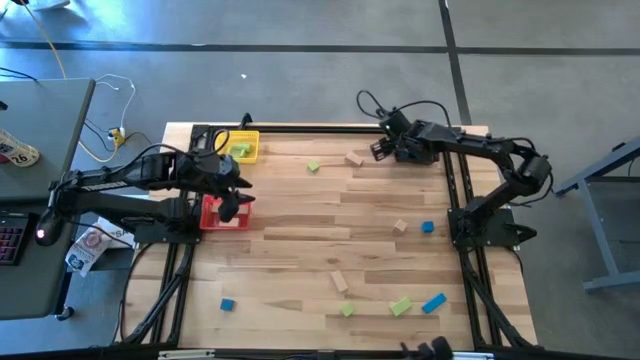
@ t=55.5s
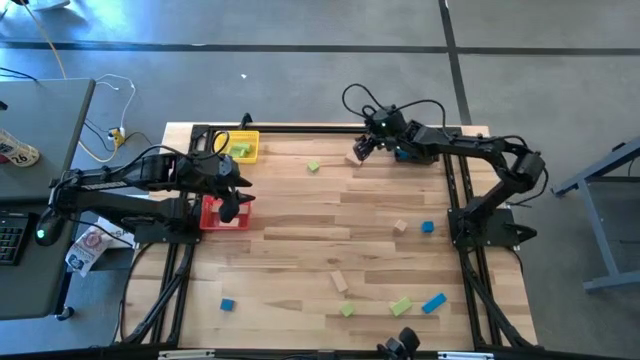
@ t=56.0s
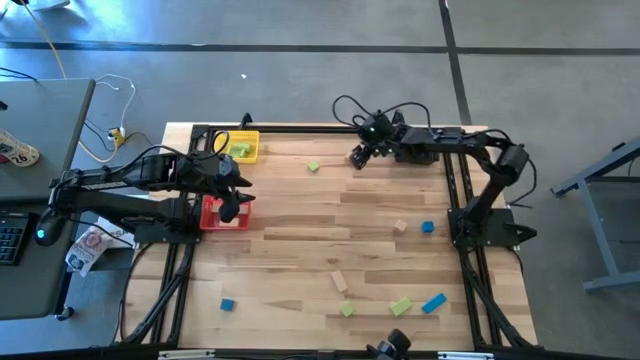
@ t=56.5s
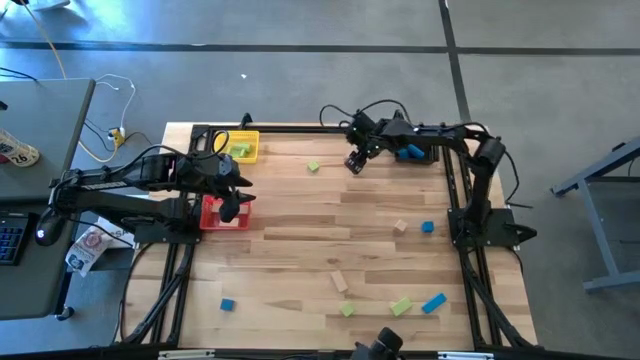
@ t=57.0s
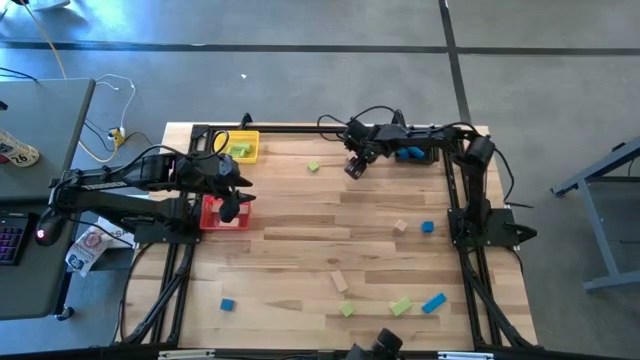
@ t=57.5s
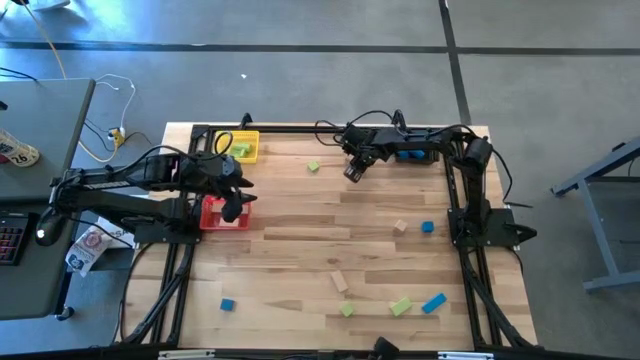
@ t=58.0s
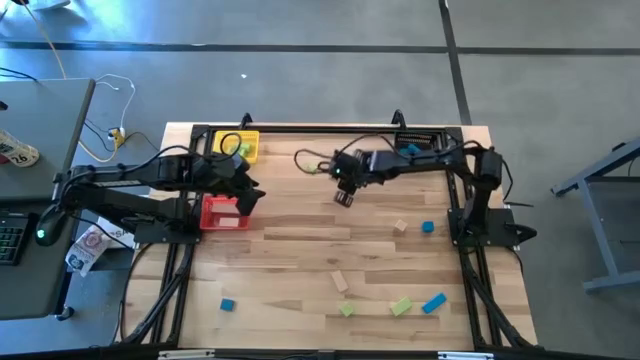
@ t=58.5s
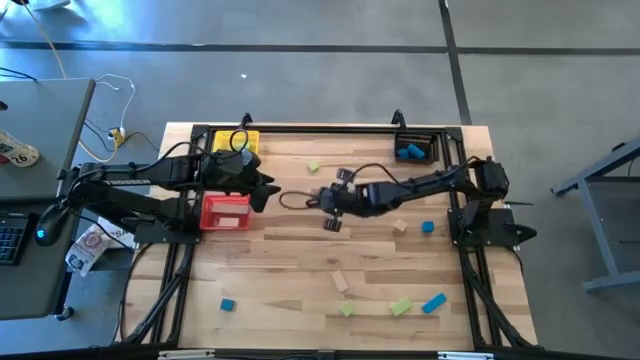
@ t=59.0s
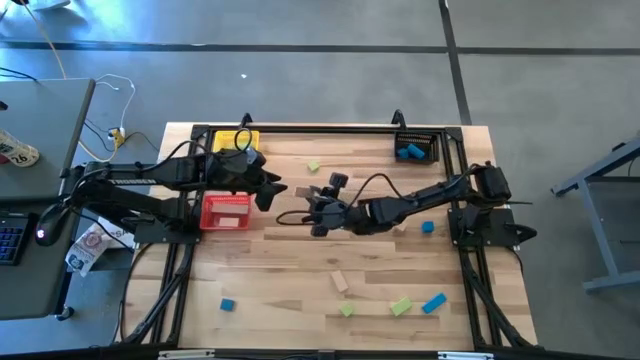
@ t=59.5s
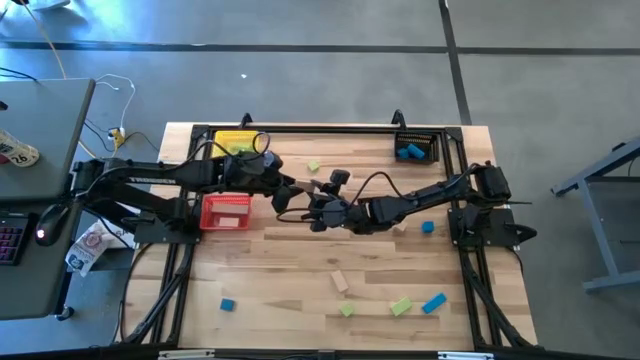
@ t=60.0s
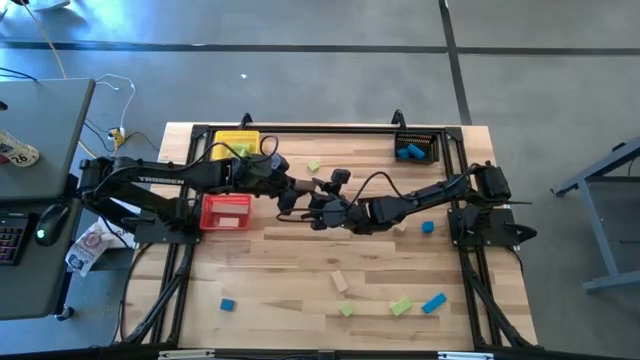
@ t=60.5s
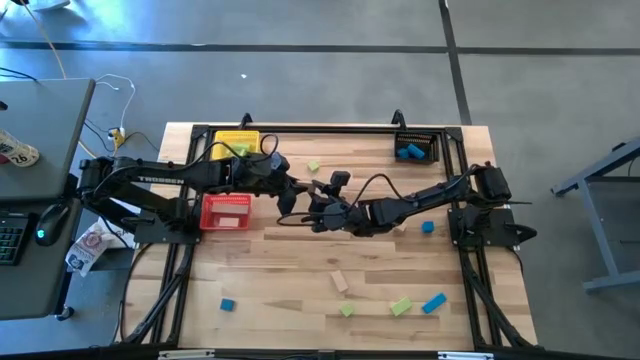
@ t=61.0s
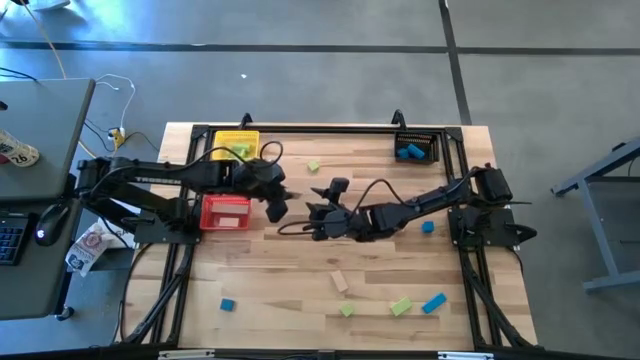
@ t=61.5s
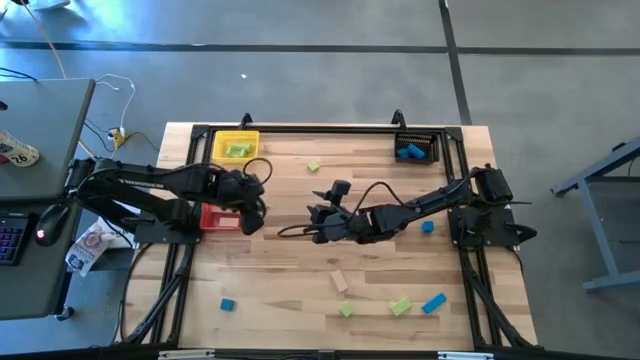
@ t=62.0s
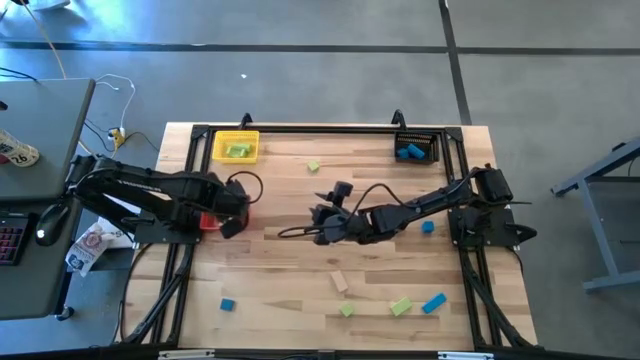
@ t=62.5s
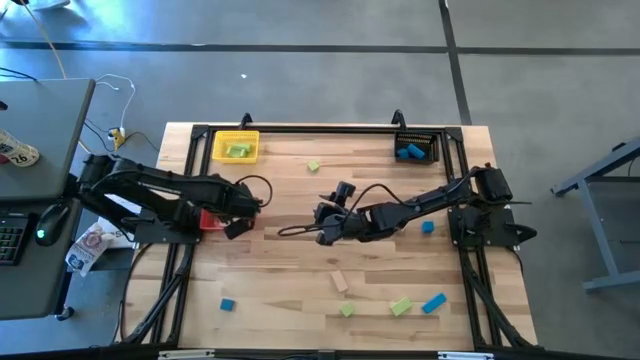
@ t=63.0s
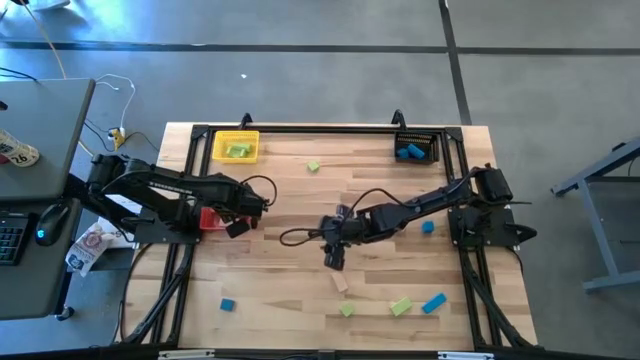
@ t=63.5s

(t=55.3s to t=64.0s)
Task: Sort & place blocks by color
Put the brown block into the red bin

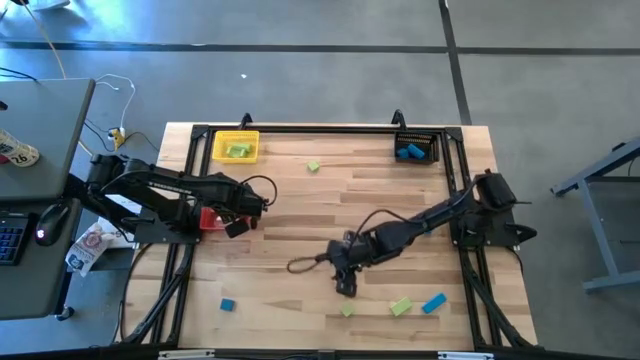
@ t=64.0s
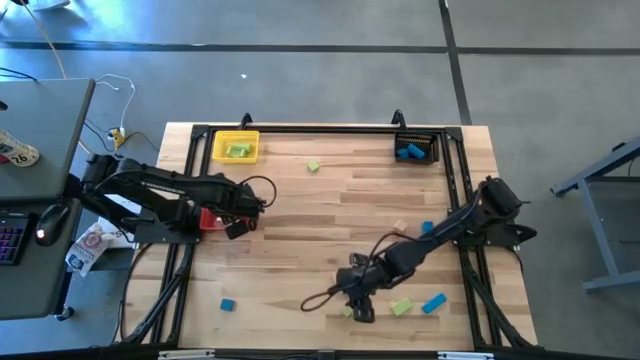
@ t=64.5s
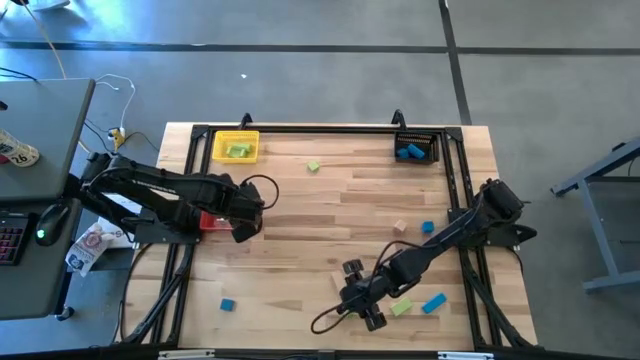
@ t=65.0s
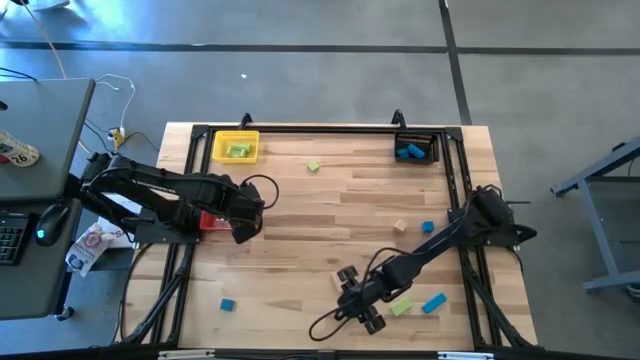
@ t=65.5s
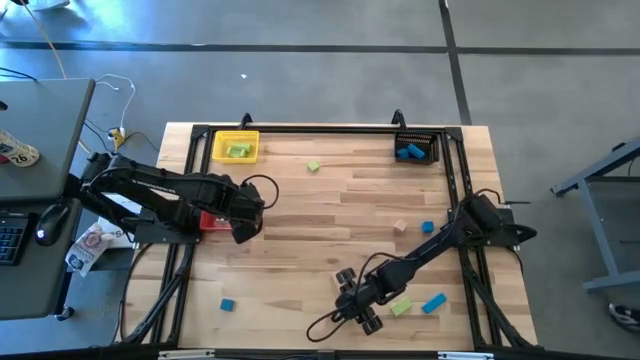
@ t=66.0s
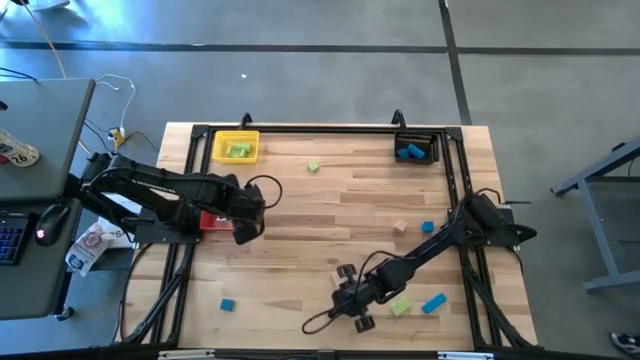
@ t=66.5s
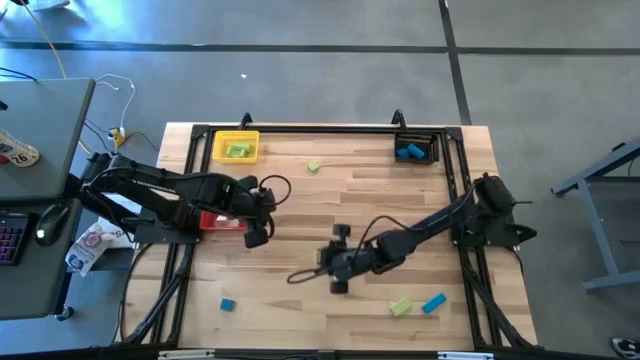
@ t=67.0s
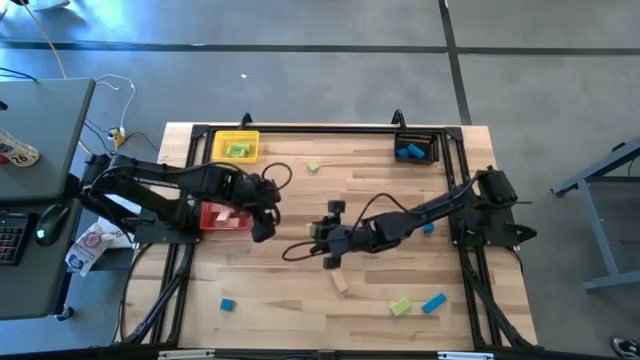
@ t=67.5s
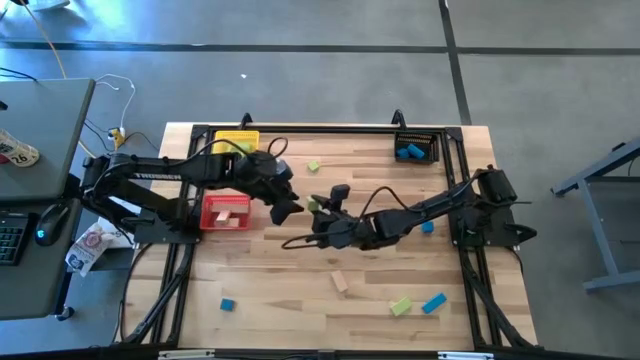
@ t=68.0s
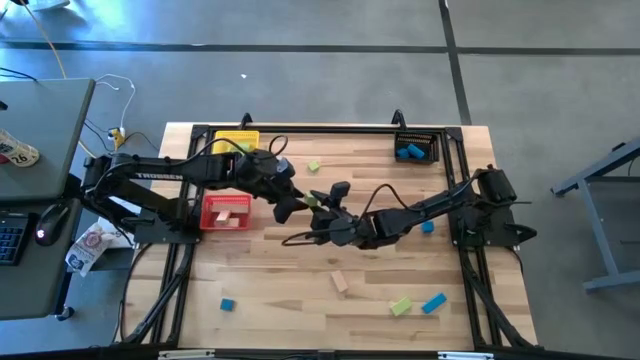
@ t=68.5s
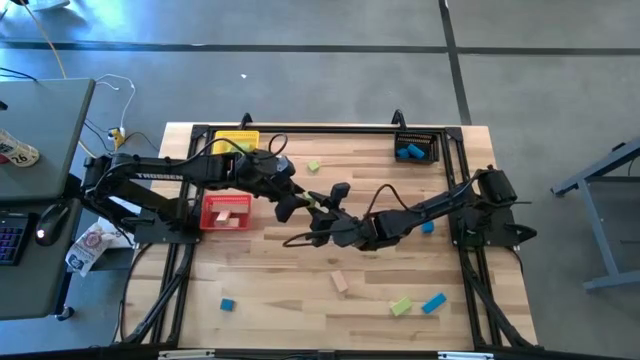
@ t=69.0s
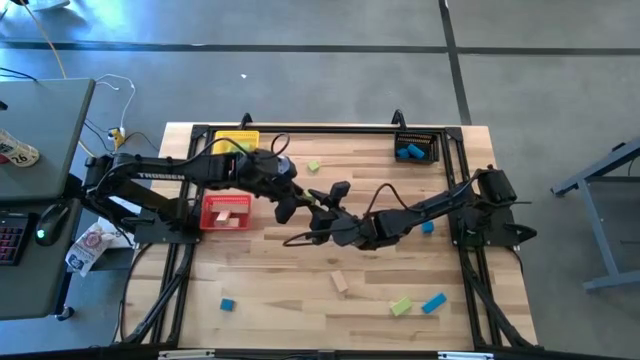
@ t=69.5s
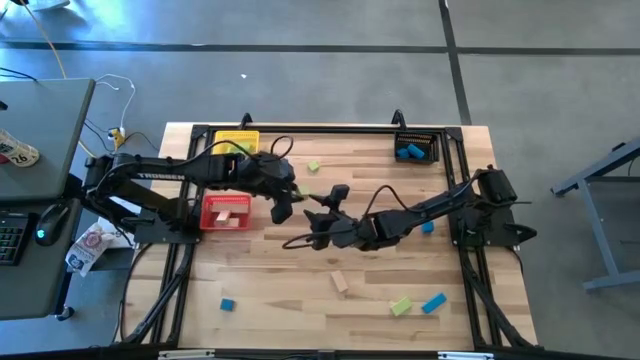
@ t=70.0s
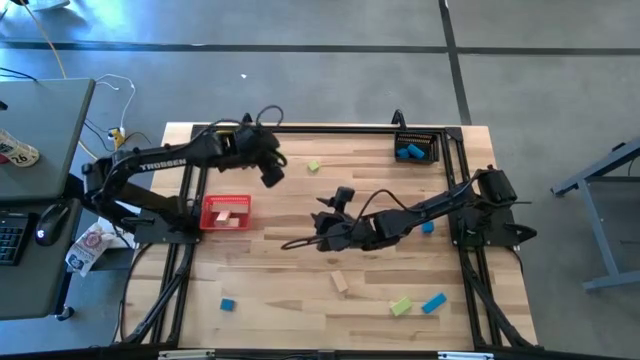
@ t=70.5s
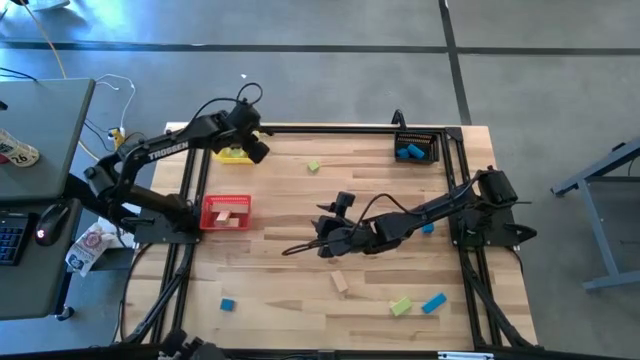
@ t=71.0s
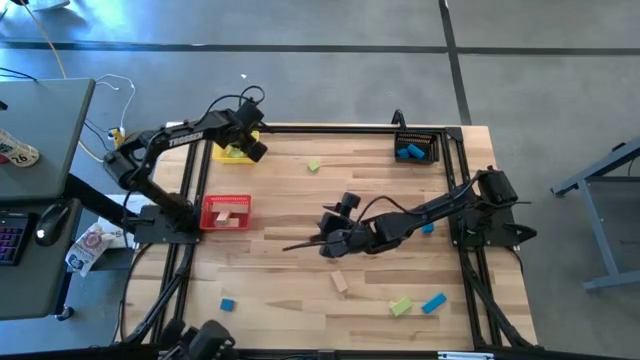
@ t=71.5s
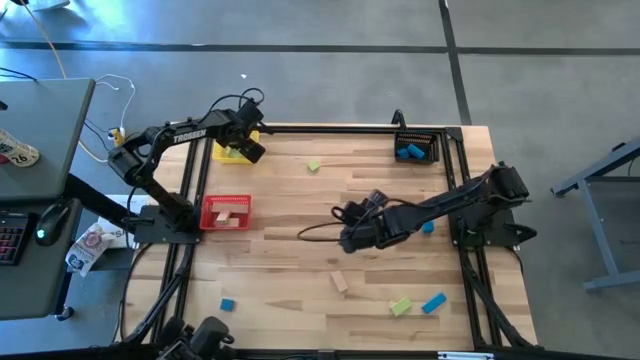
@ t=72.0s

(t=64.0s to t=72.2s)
Put the green block into the yellow bin

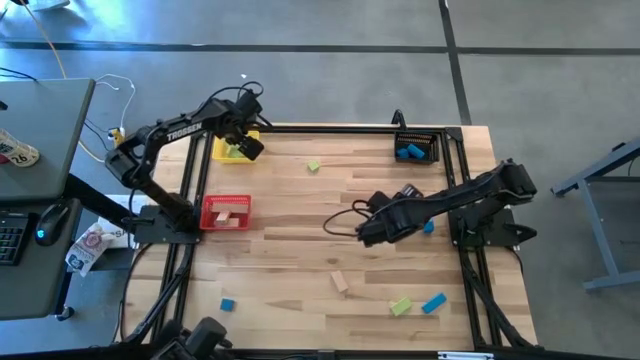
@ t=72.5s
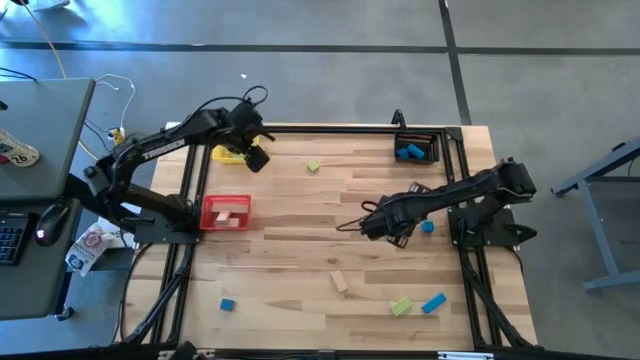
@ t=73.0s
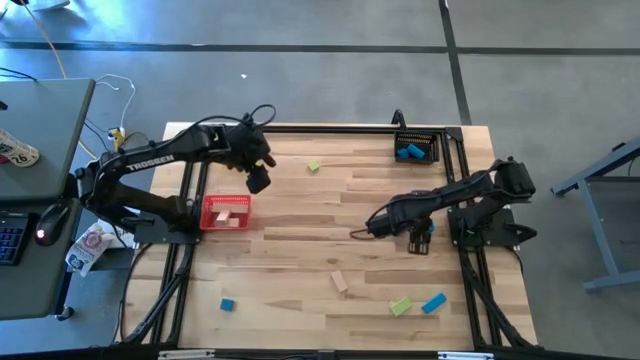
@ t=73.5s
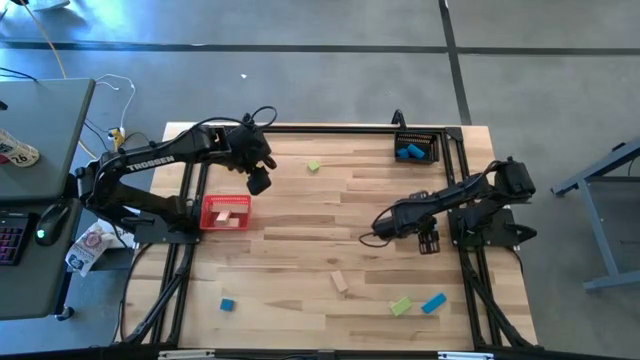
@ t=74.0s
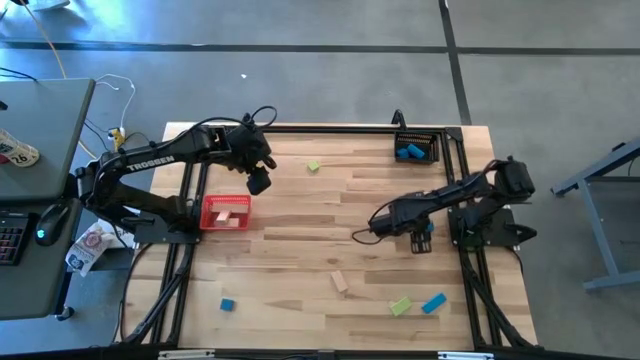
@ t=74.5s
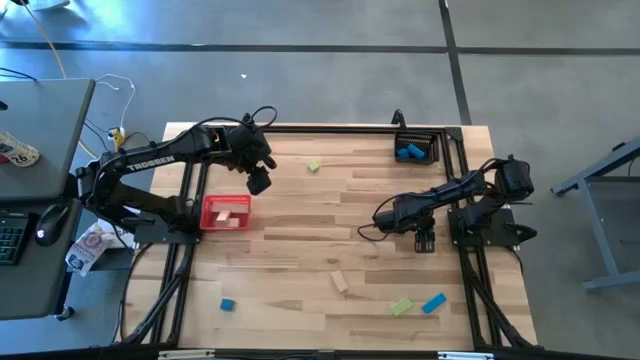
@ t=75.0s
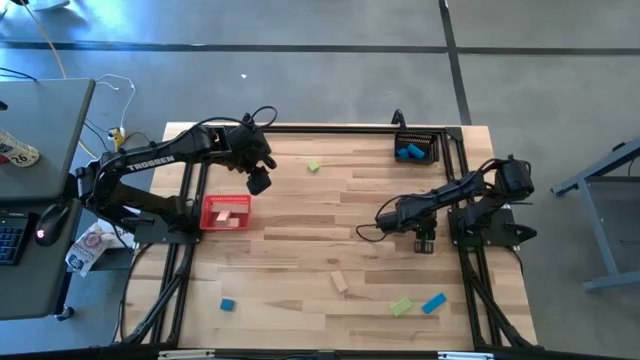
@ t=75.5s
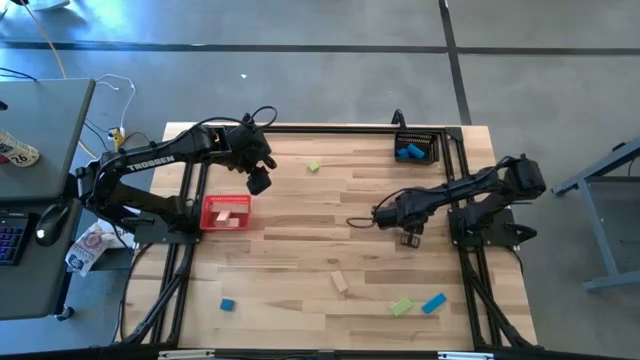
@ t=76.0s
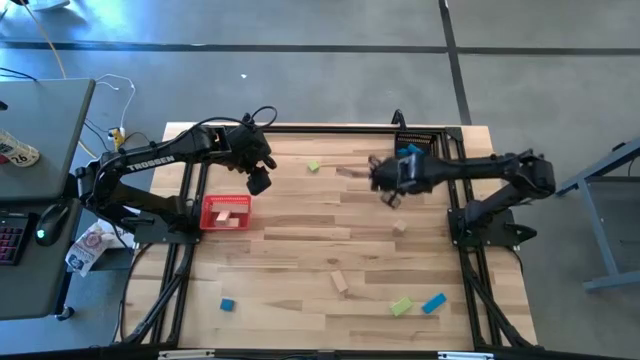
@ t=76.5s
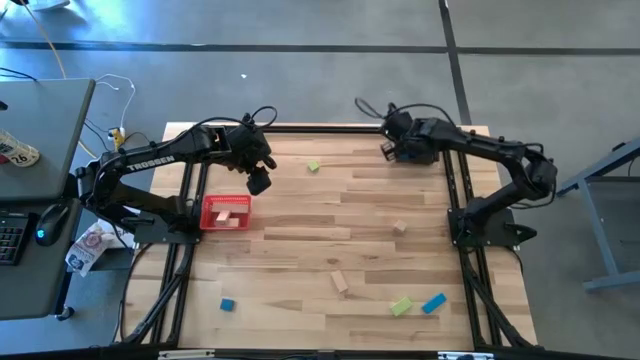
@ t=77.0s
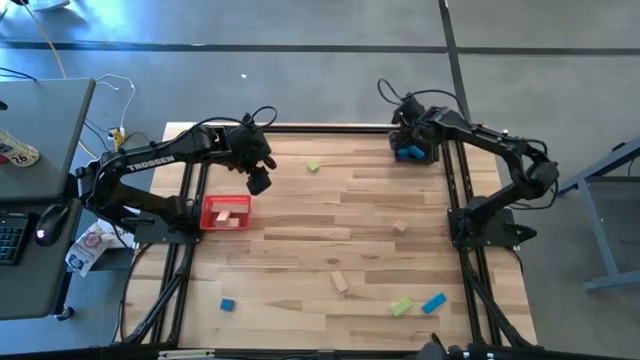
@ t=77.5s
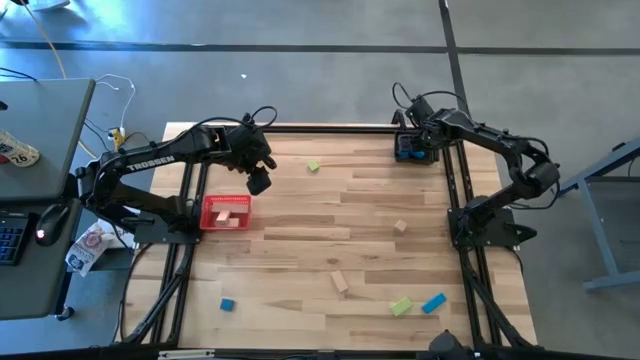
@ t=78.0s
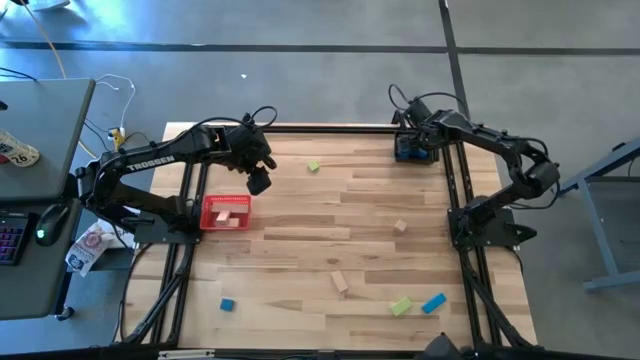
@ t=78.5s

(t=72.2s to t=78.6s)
Put the blue block into the black bin
